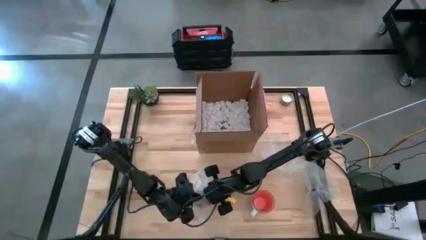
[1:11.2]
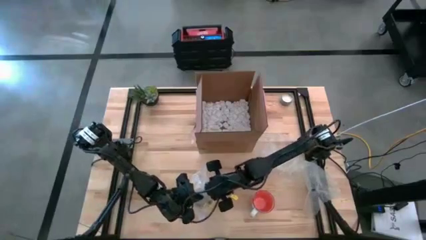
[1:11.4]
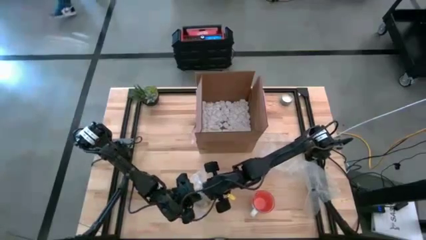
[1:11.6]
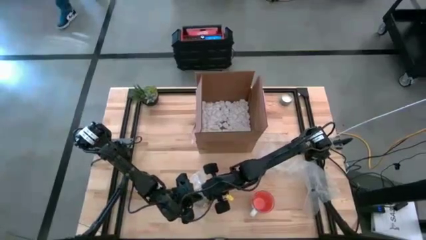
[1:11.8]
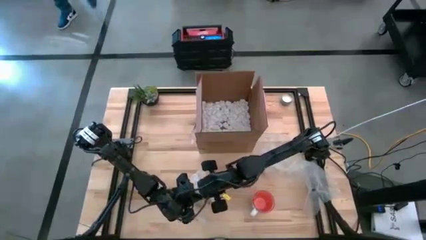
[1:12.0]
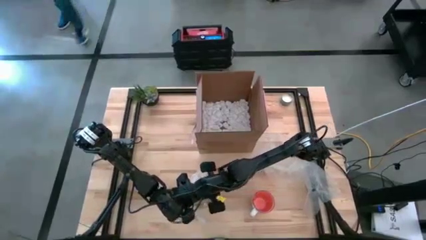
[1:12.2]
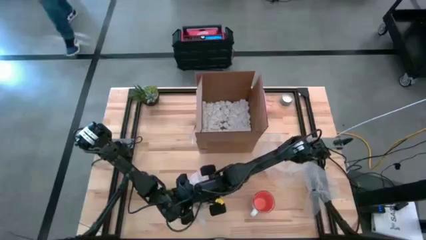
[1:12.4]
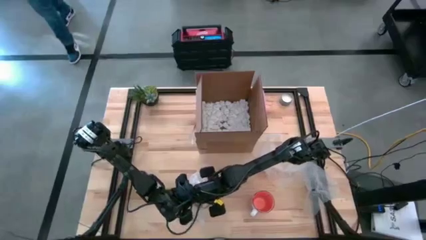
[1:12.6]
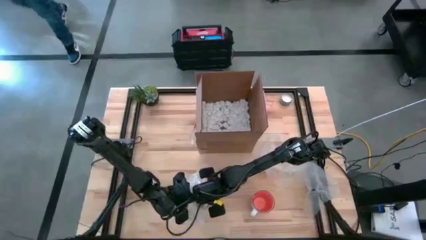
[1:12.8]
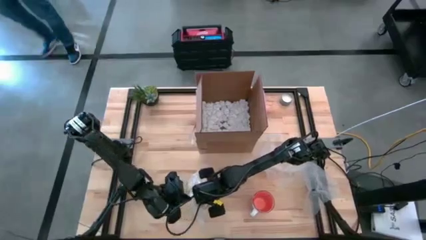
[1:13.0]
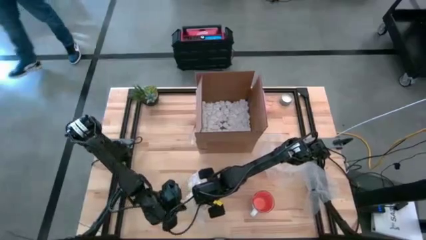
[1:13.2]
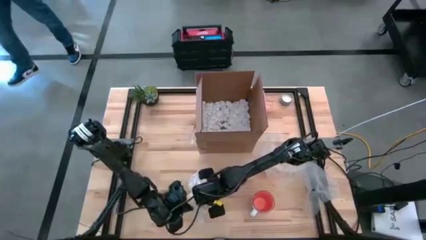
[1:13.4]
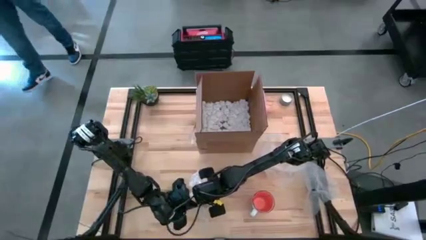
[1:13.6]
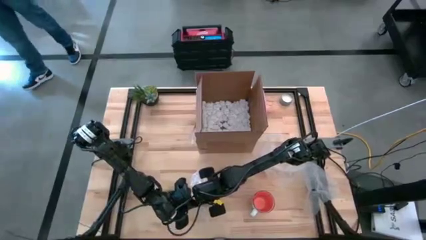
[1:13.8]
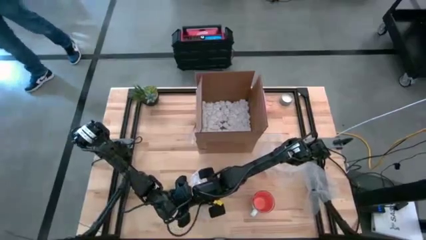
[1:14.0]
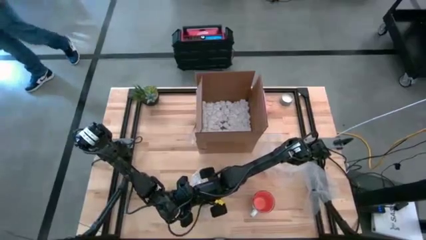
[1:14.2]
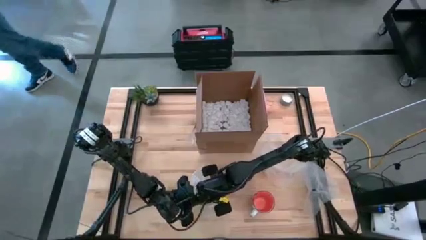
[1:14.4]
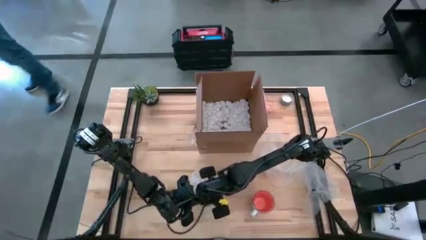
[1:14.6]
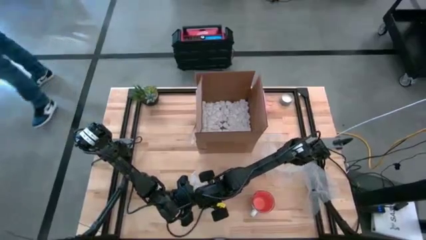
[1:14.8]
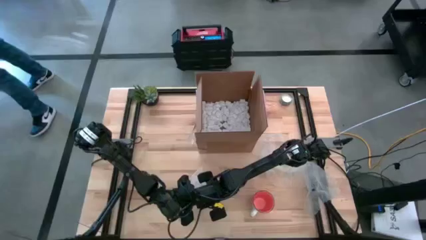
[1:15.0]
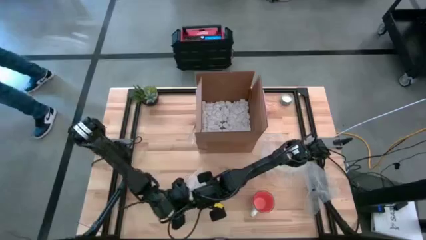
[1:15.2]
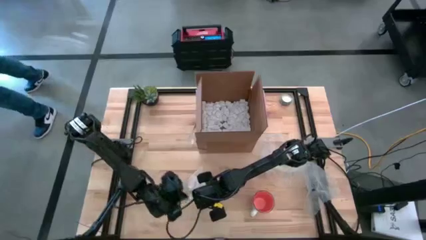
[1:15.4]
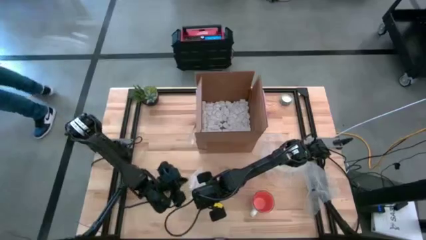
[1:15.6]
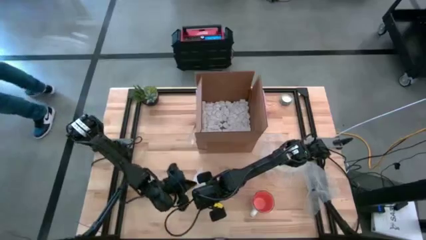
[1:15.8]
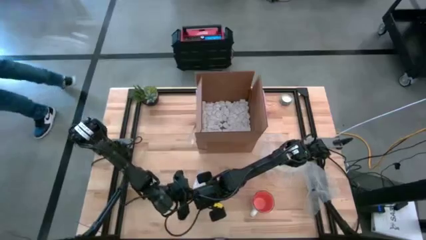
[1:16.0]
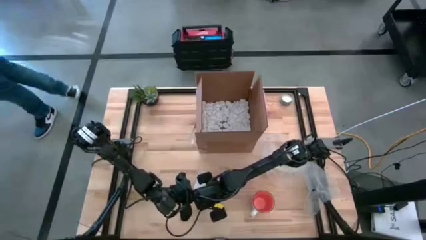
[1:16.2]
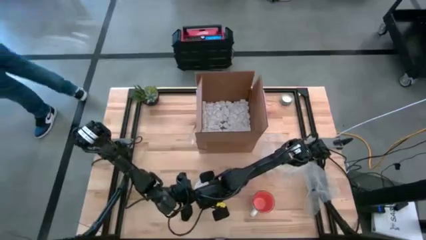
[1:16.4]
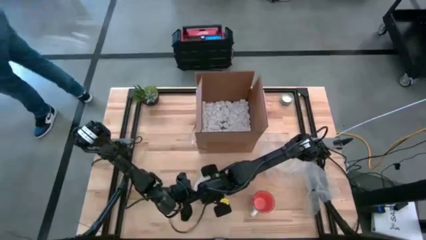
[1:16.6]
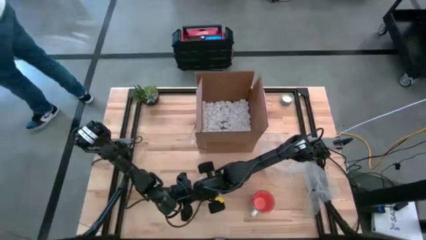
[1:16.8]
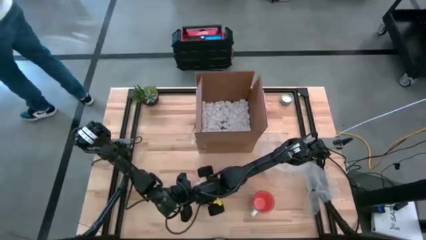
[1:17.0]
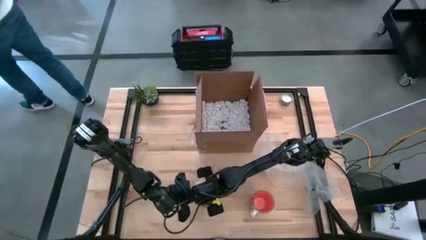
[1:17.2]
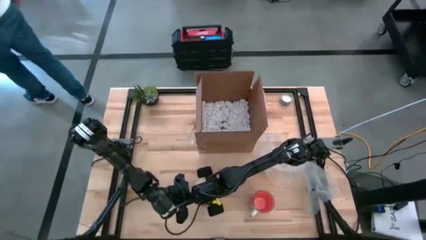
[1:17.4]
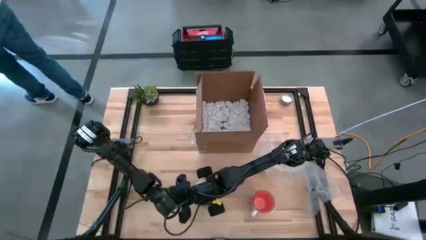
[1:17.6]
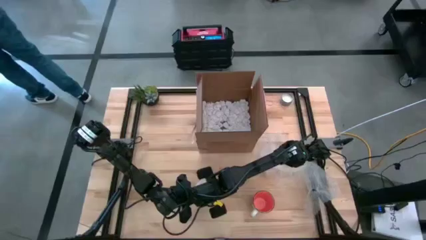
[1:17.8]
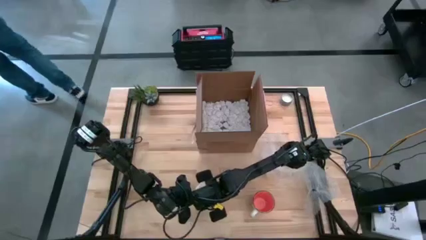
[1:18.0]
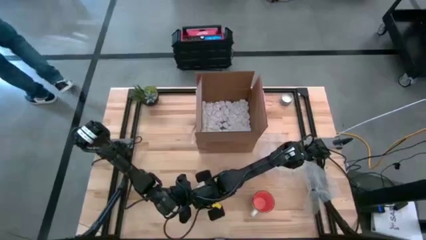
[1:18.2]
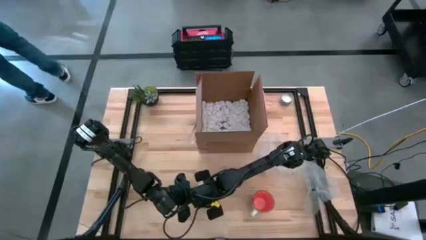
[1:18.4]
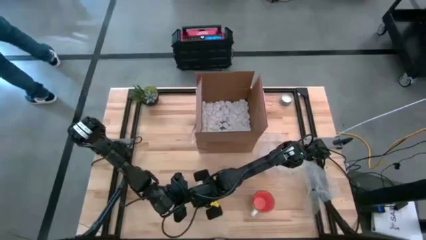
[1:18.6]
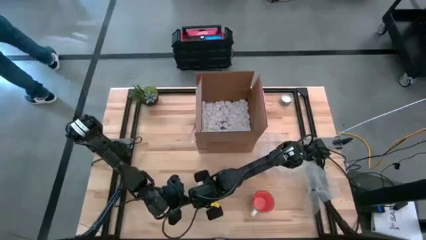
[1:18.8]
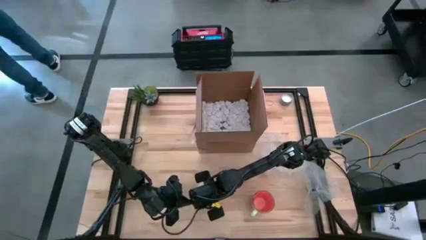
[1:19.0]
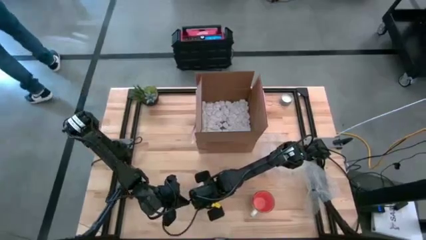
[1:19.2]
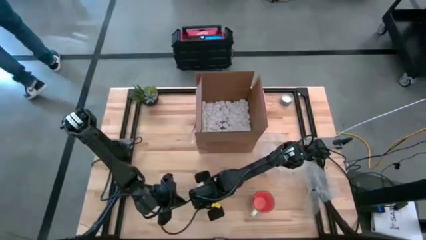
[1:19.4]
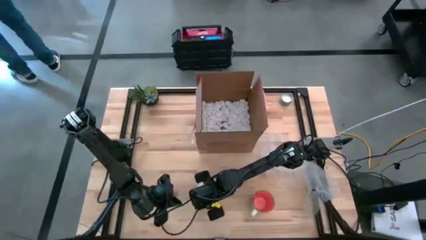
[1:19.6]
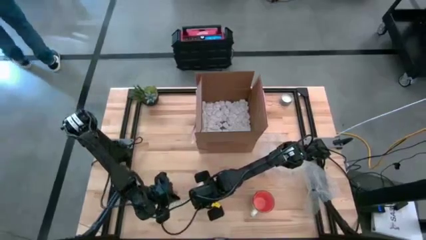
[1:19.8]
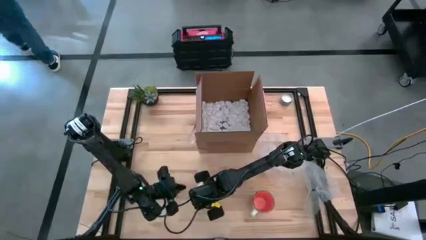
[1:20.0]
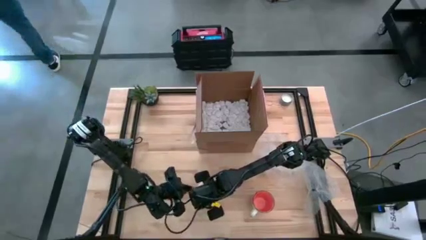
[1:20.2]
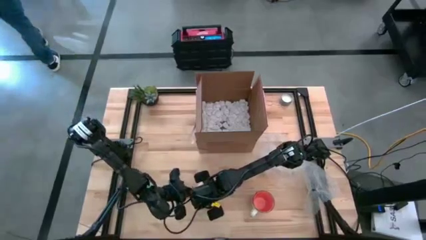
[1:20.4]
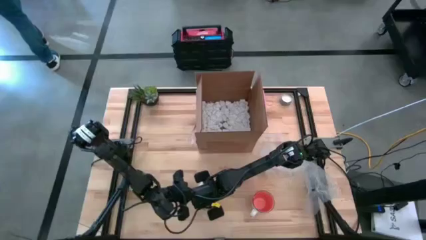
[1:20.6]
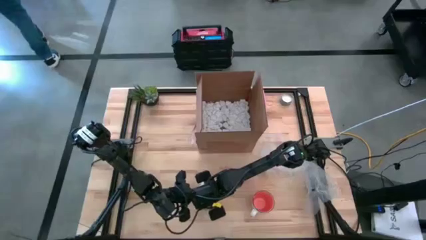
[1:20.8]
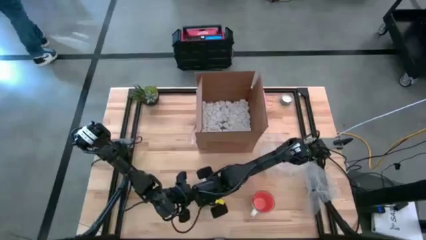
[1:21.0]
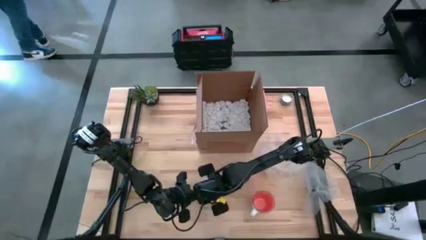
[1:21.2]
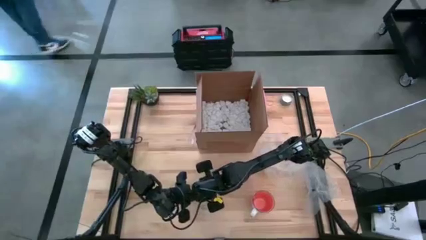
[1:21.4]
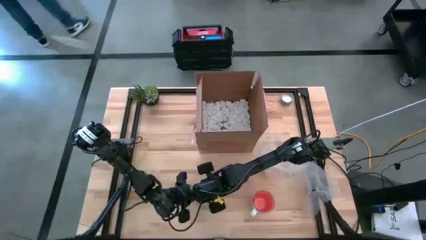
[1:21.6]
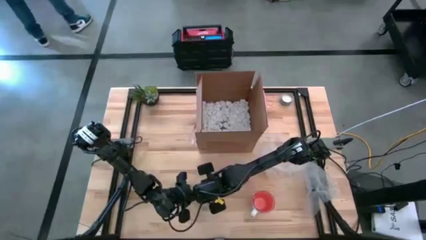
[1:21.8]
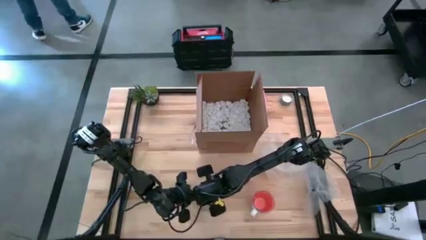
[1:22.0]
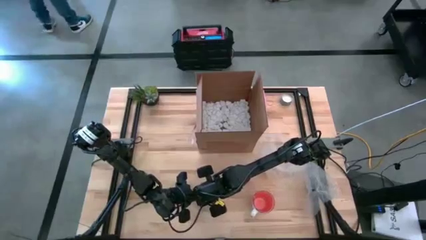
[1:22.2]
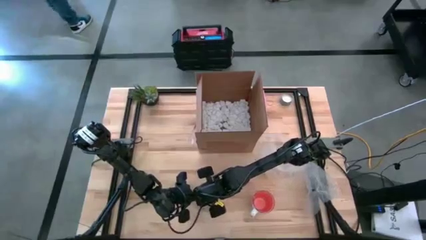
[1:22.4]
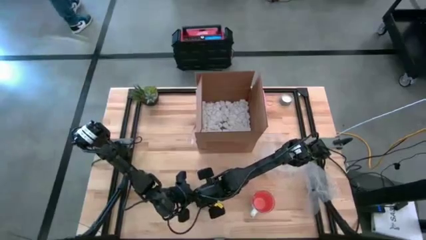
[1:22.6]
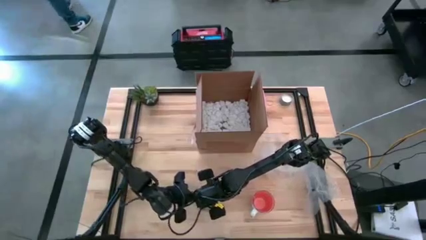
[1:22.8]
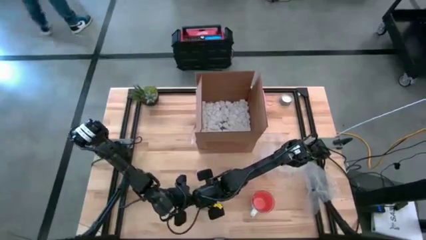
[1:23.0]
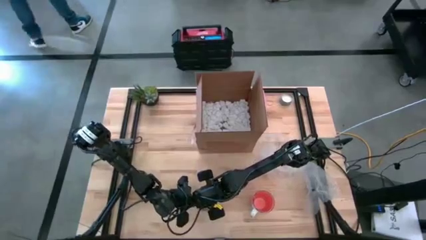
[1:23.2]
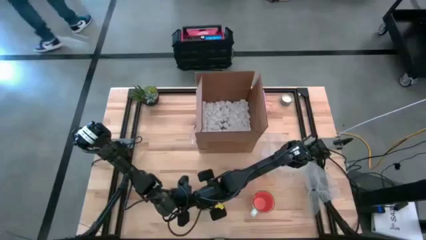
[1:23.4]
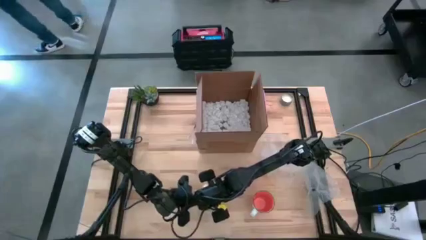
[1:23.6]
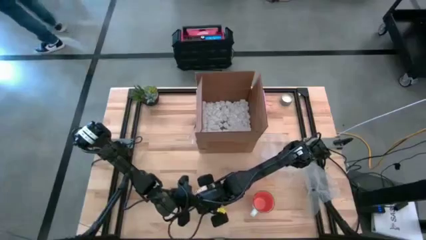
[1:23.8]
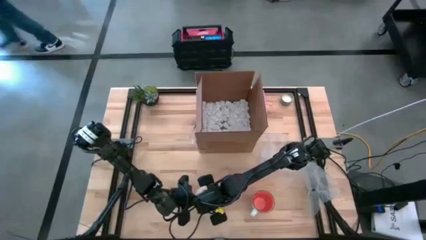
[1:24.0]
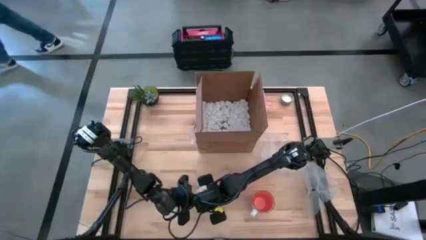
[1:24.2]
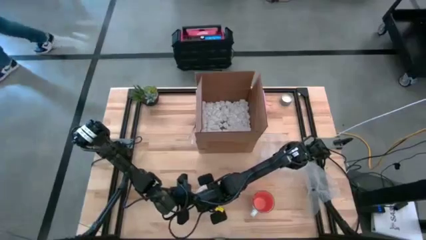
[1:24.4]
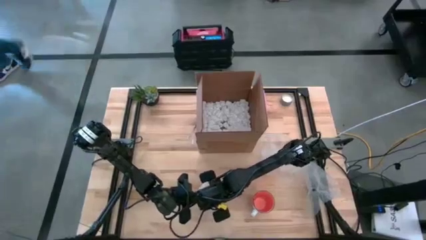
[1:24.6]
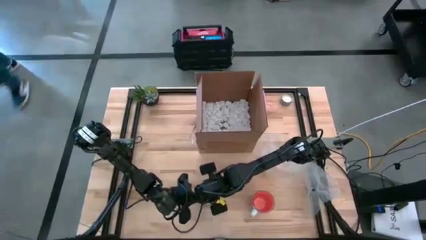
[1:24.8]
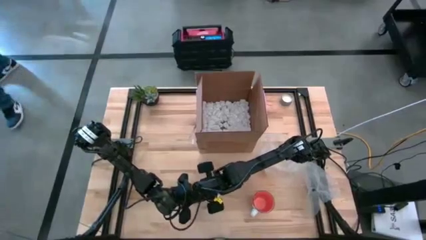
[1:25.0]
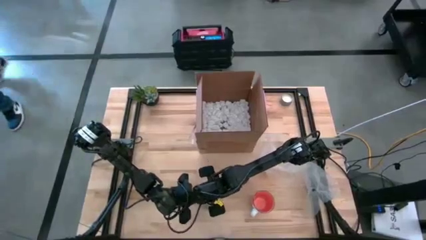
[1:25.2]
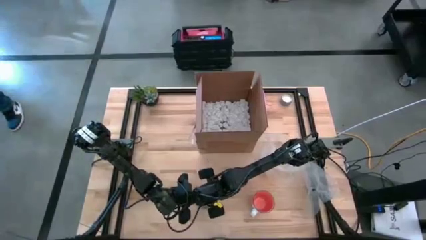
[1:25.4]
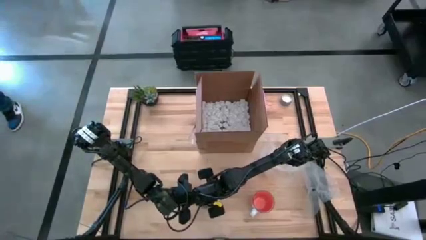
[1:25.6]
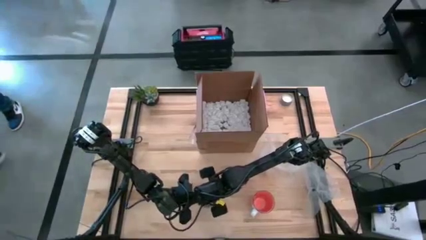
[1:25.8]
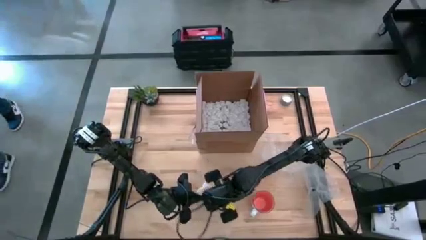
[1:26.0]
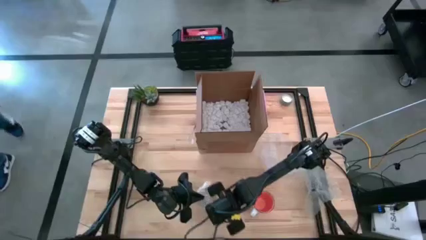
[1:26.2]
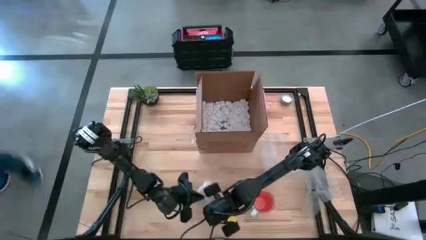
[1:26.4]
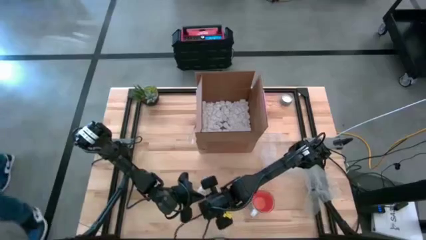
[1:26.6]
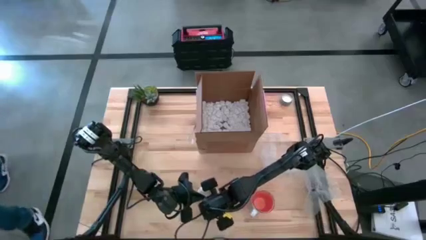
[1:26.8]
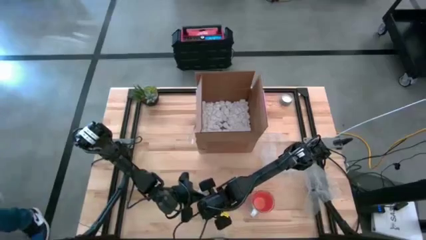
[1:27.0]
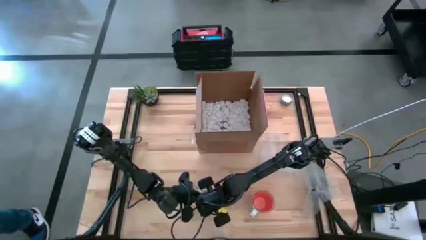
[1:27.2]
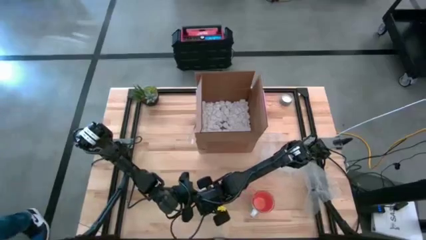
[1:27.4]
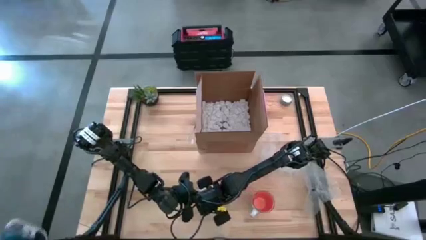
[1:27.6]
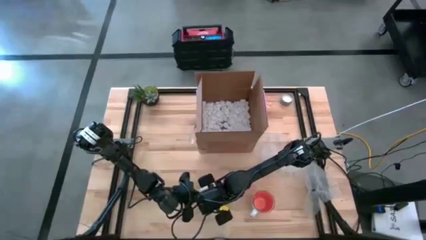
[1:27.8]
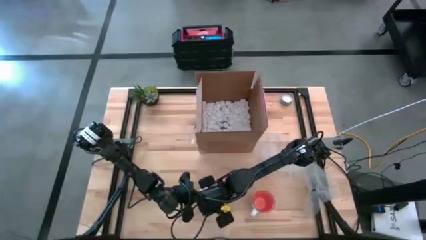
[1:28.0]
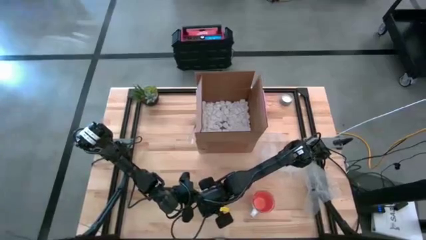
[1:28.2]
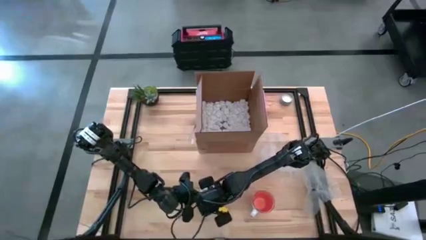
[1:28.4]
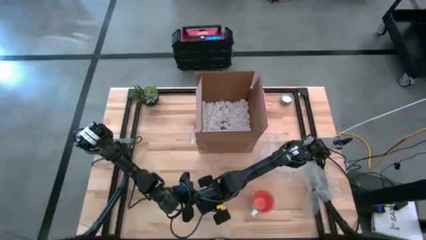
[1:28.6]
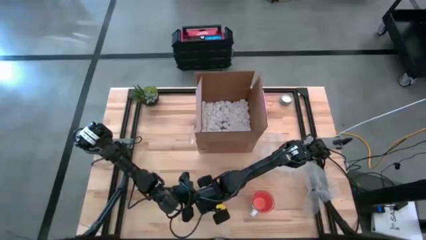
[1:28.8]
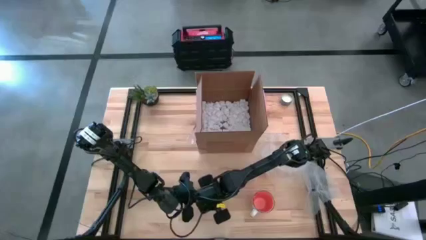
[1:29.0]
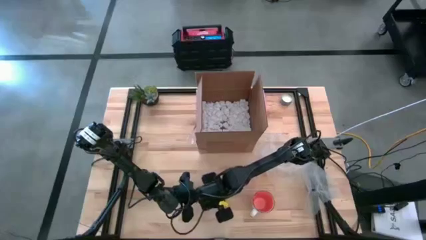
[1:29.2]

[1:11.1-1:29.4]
Task: wrap mug
Wrap the yellow mug with bubble wrap
